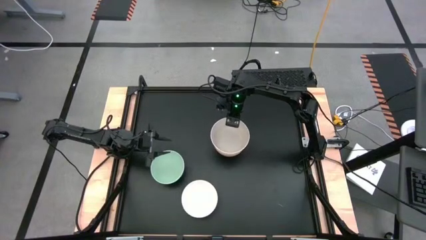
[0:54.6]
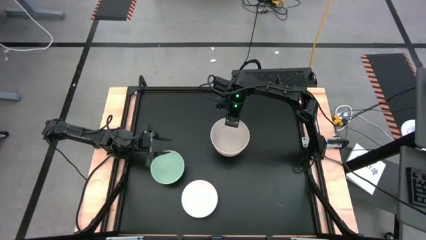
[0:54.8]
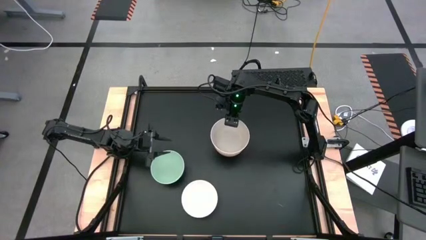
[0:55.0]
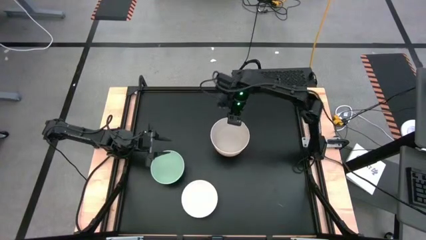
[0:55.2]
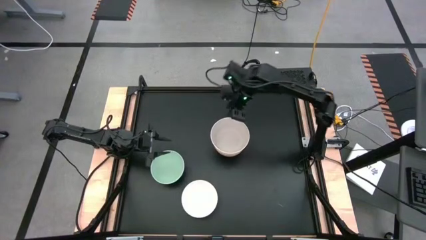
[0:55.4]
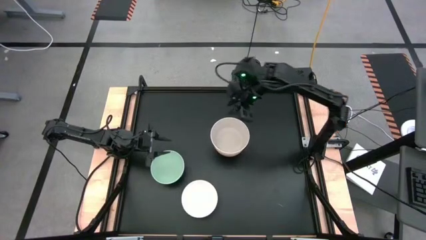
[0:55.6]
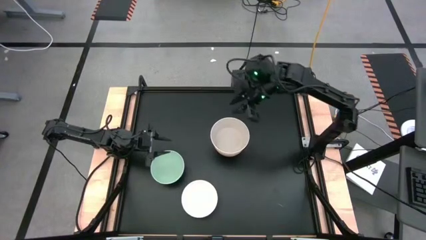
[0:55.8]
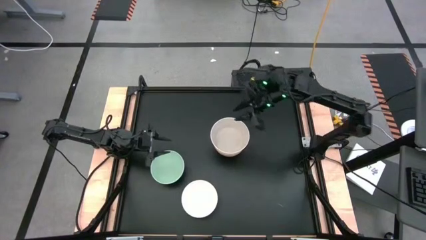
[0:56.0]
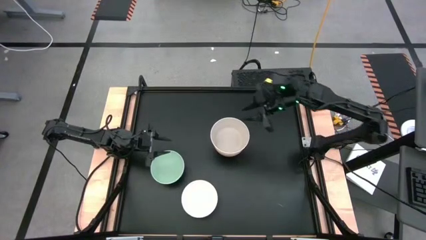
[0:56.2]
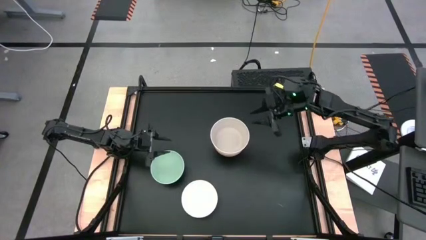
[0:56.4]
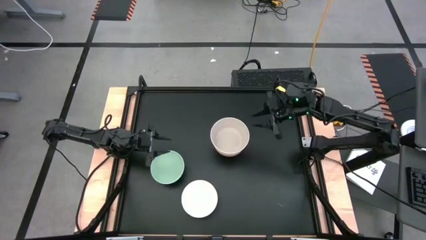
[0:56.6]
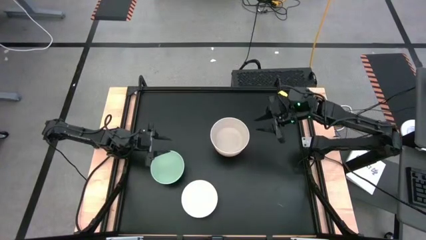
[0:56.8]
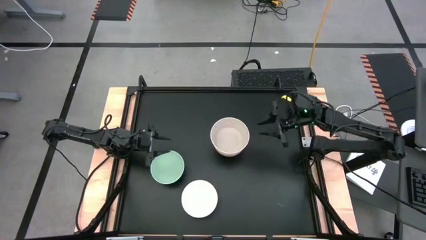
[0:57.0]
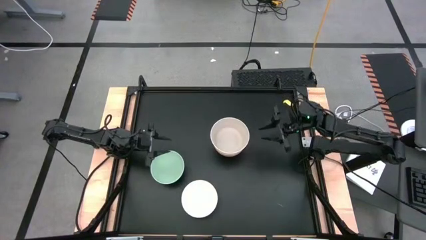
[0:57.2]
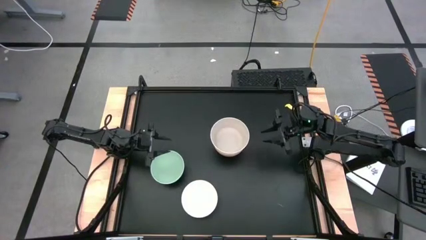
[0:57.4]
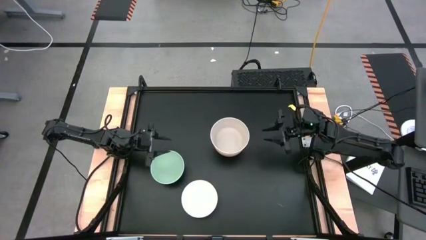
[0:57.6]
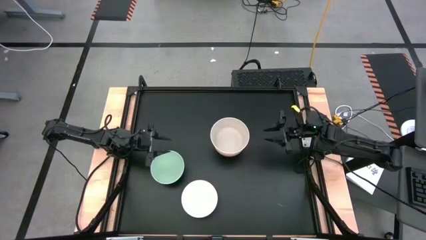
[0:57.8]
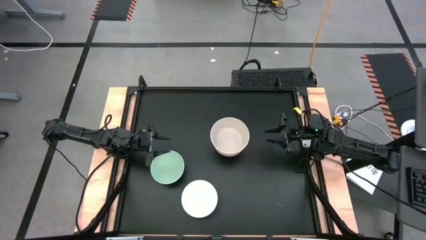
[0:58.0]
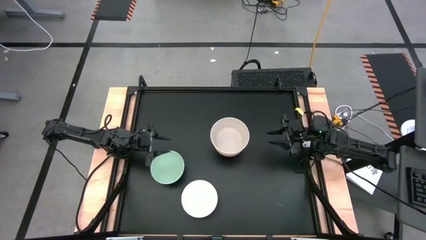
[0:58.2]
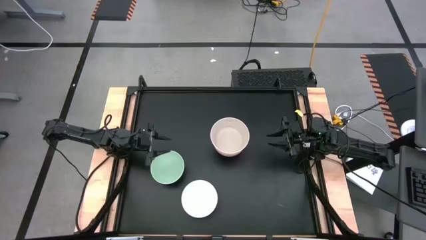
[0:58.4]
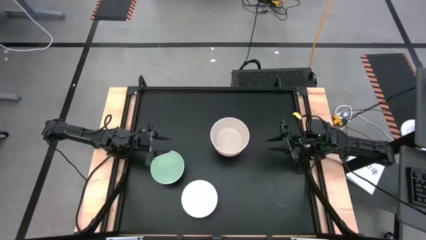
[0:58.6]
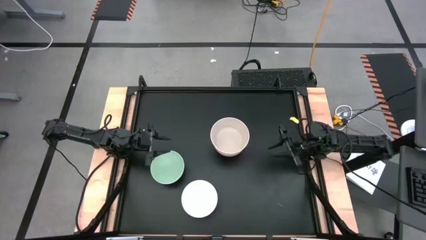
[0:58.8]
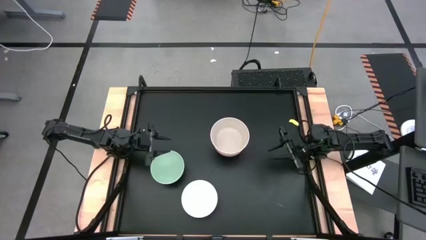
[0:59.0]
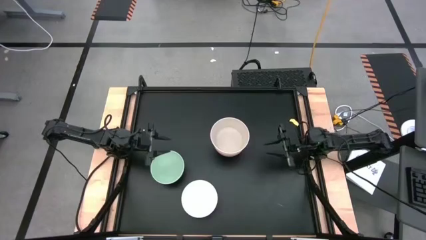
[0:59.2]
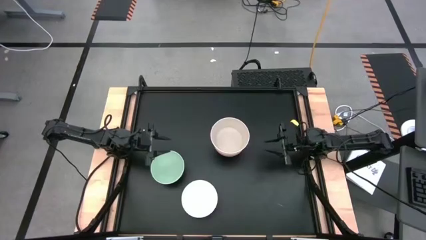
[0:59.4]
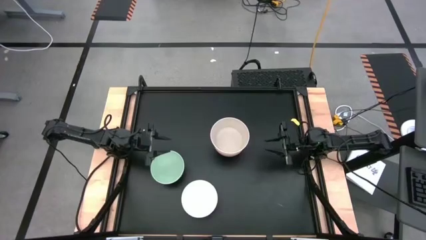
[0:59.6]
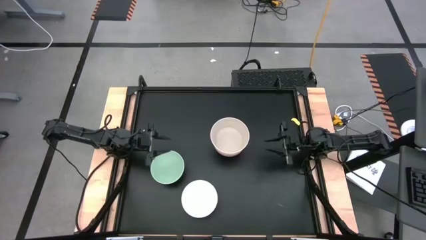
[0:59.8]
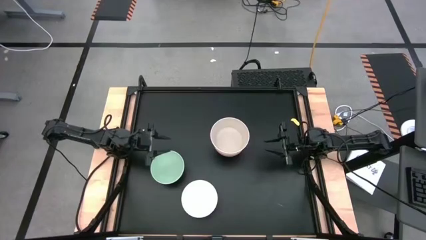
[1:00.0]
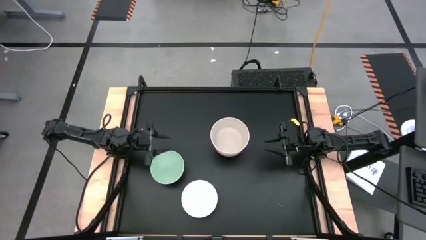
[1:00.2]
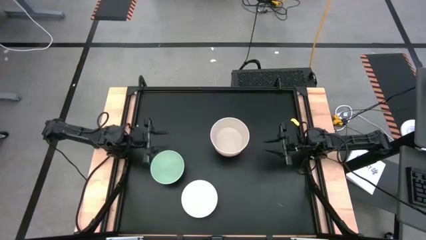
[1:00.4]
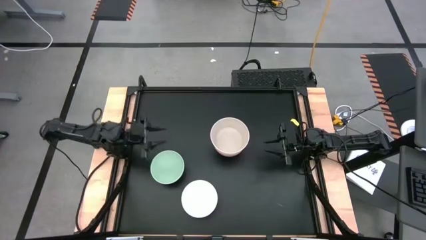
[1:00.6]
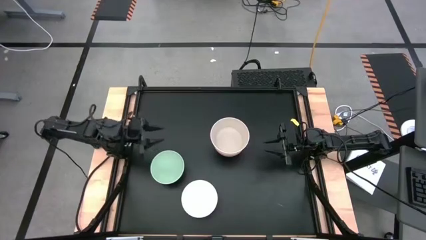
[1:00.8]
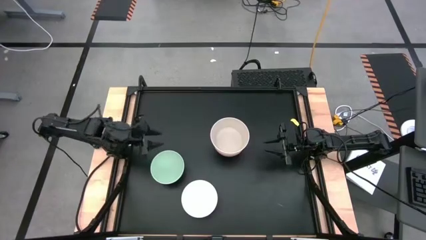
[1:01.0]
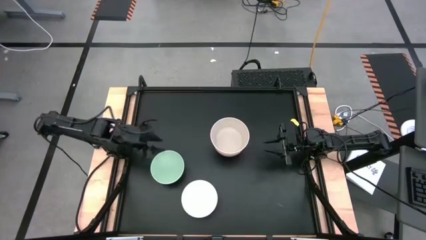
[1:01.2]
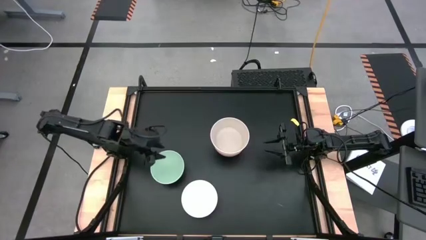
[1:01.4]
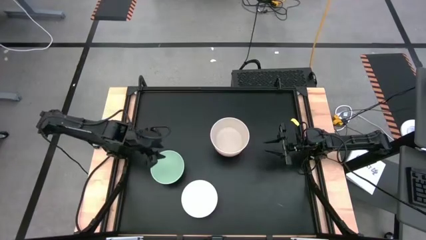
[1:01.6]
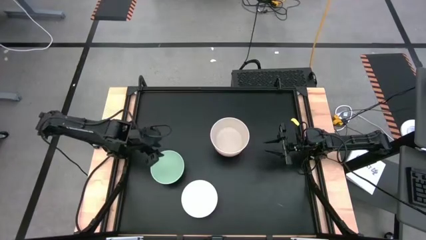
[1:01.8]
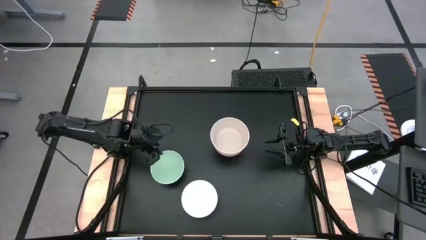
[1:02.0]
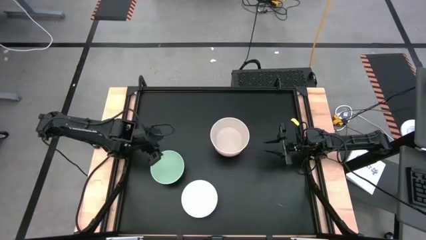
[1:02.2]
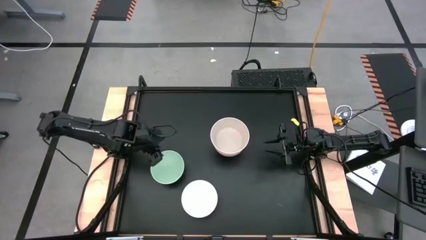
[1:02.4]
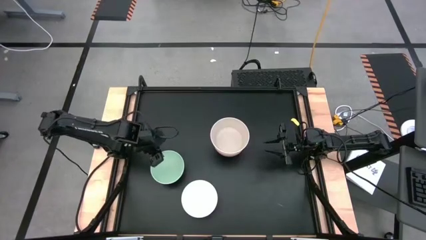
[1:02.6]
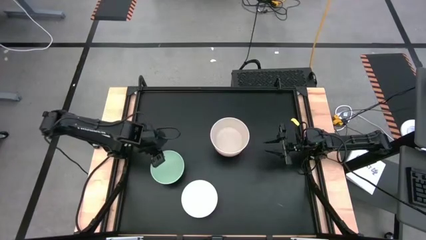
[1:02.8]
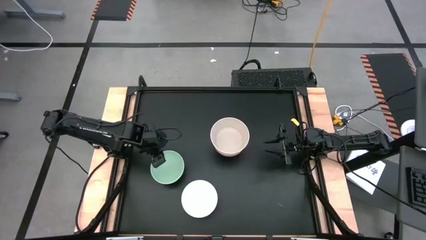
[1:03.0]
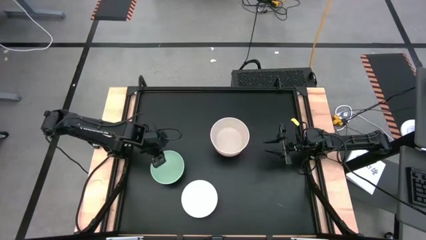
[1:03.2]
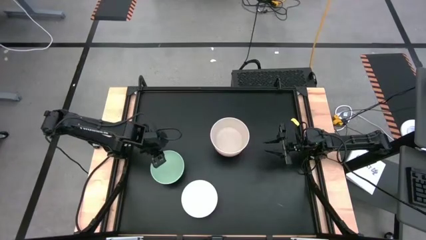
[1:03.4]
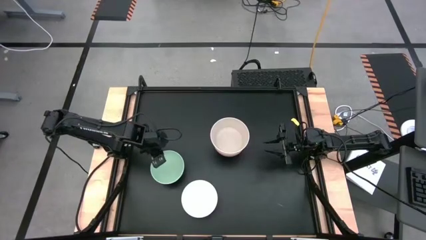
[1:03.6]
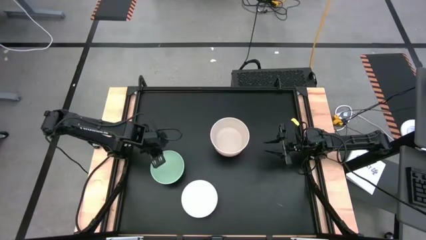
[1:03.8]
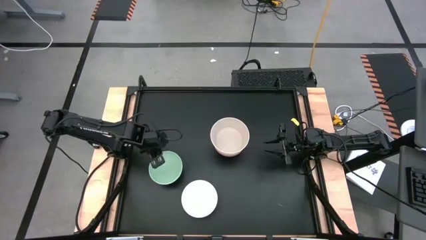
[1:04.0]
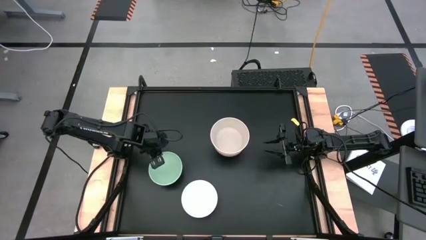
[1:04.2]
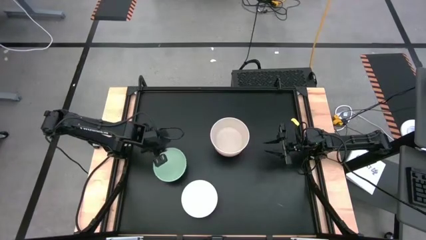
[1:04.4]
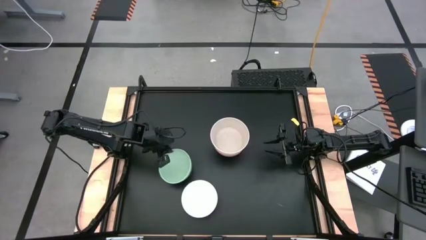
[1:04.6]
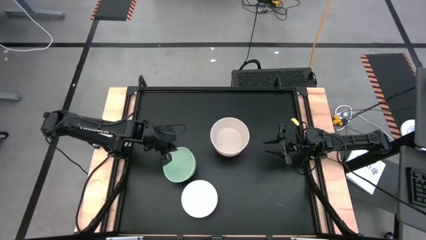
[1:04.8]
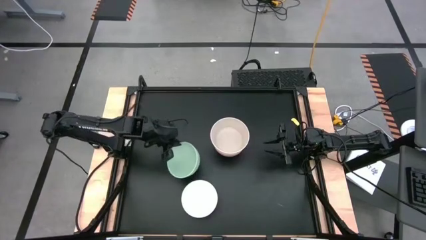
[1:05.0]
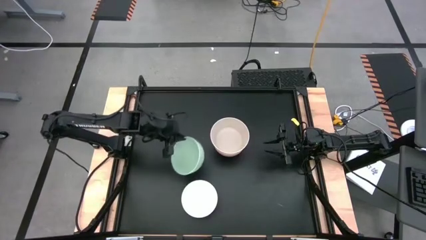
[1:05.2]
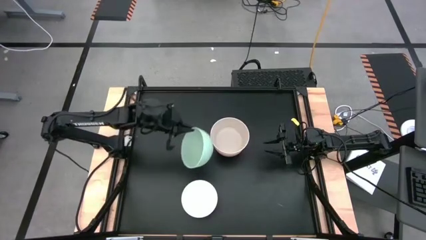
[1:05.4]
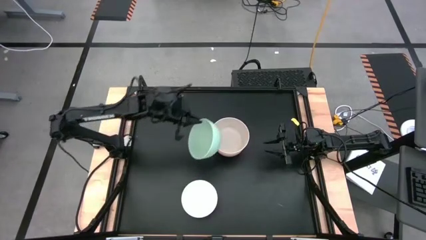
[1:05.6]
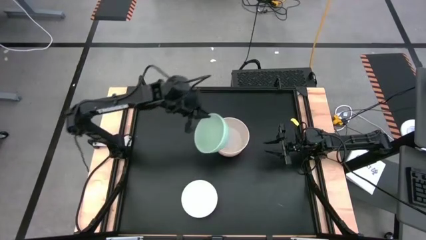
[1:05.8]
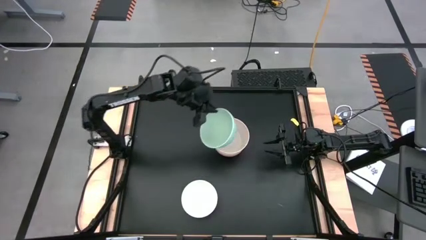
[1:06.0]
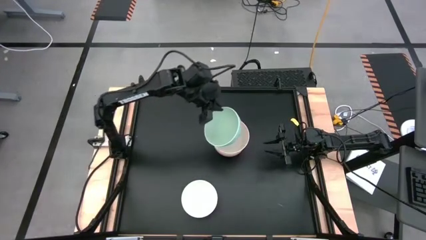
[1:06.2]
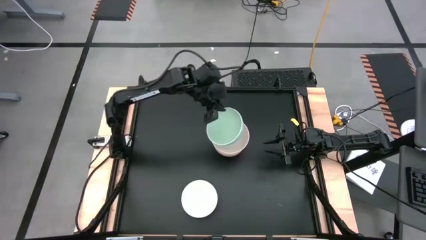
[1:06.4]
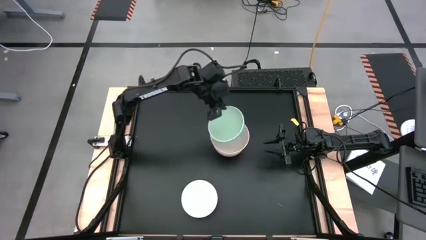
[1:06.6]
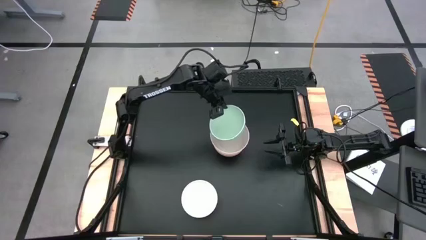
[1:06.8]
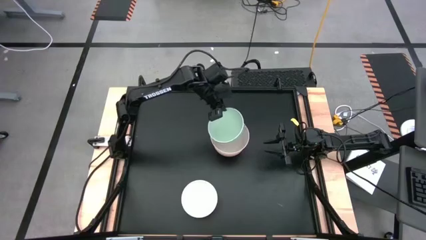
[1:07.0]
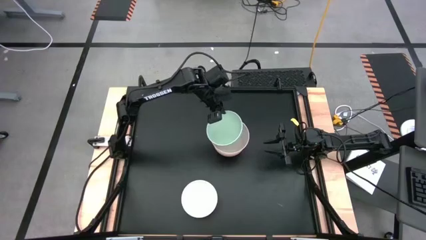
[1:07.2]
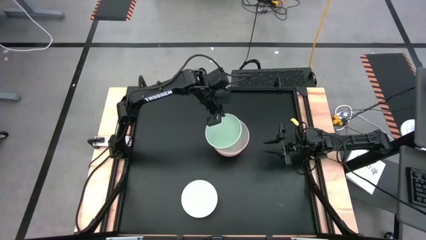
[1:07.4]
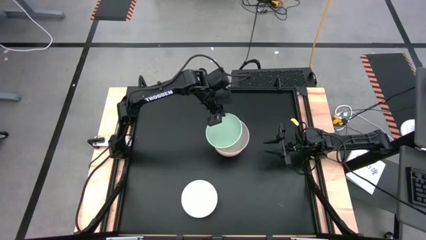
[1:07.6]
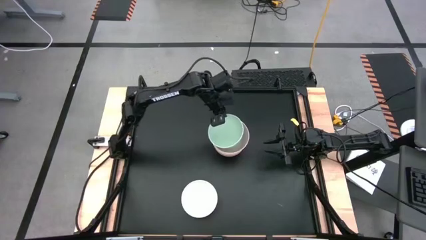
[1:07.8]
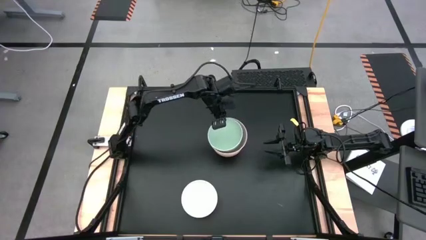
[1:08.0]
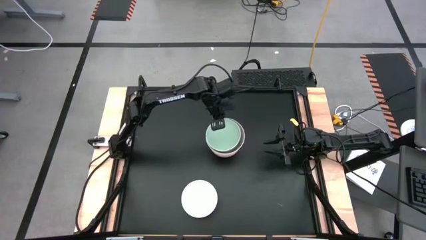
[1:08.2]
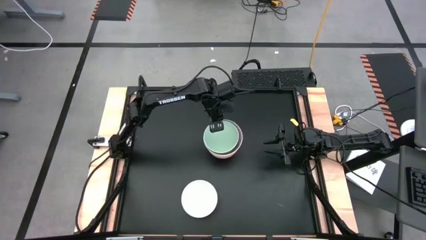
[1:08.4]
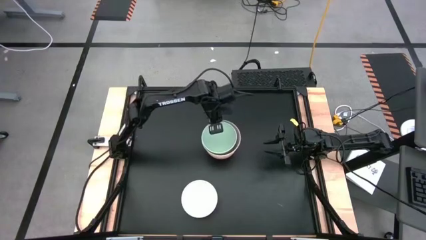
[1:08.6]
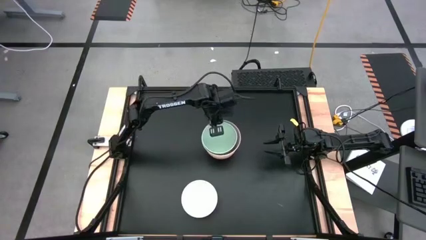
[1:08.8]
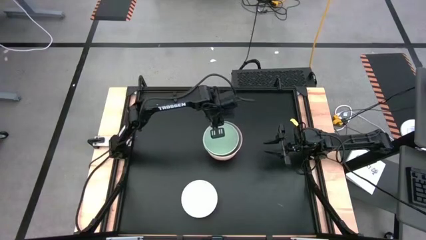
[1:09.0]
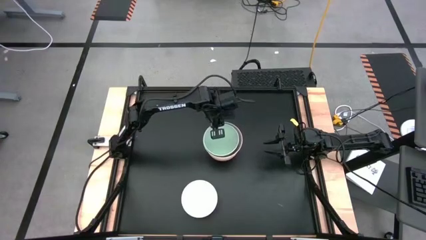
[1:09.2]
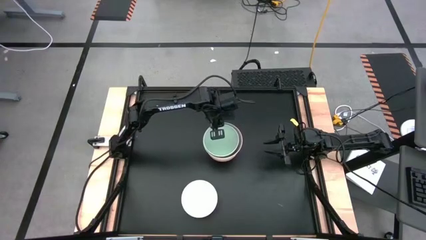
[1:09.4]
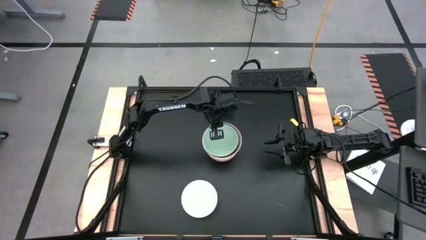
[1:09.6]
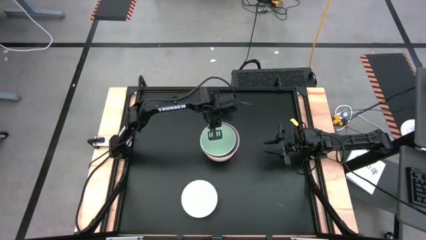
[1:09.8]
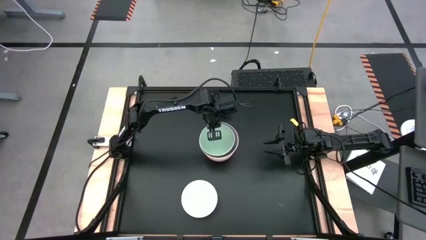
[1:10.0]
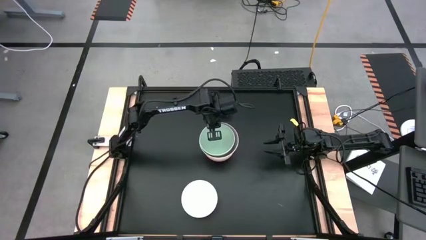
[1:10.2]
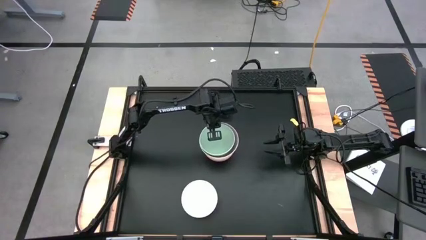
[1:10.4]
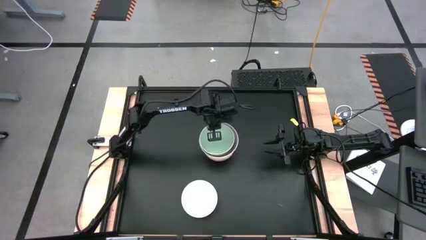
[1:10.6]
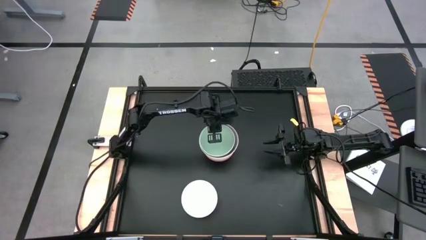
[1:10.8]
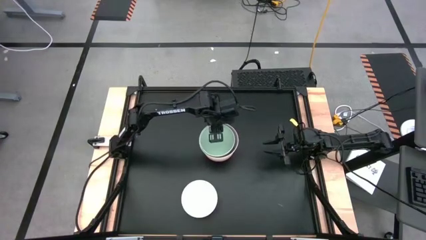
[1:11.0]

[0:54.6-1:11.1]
Task: Nest bowls inside each other
Stack the light green bowl on top of the dark white bowl
